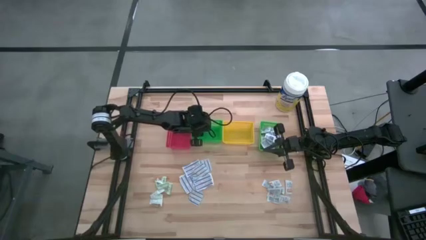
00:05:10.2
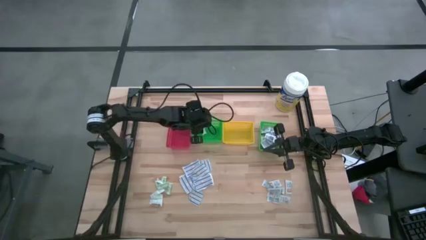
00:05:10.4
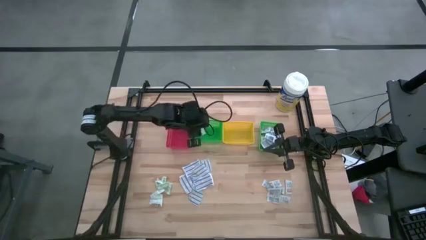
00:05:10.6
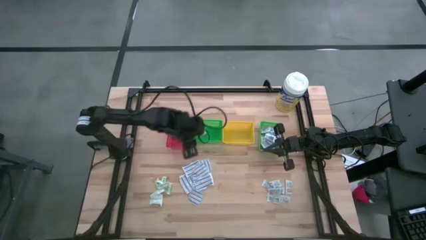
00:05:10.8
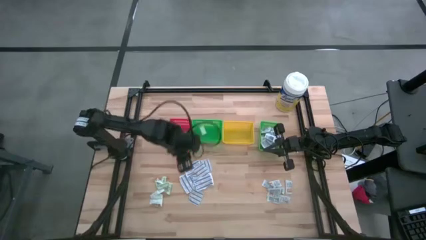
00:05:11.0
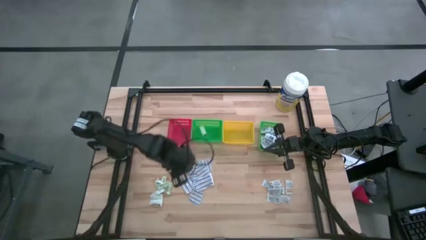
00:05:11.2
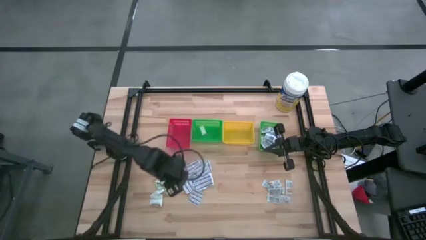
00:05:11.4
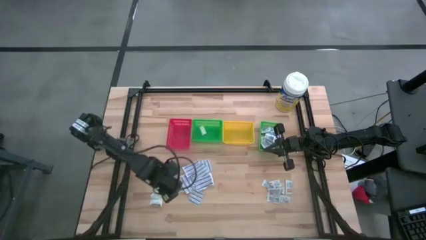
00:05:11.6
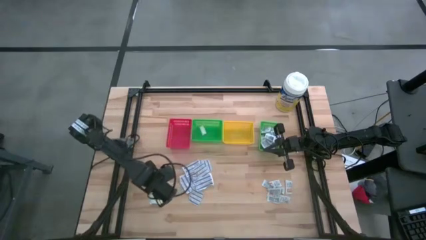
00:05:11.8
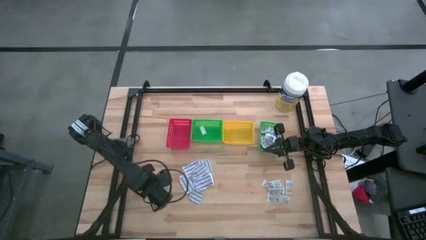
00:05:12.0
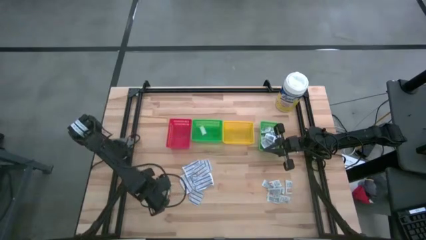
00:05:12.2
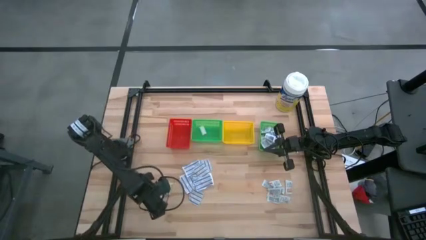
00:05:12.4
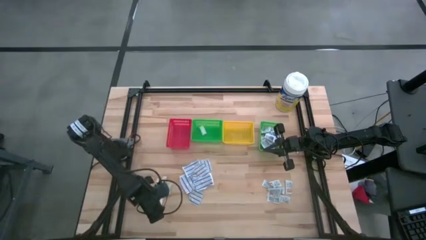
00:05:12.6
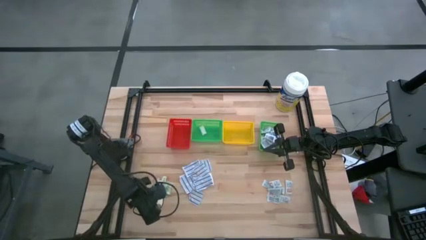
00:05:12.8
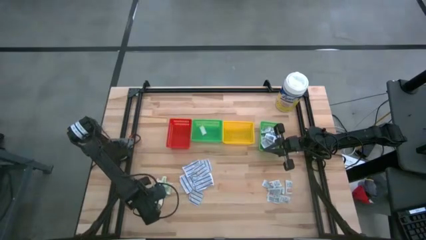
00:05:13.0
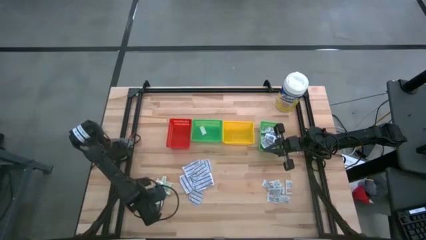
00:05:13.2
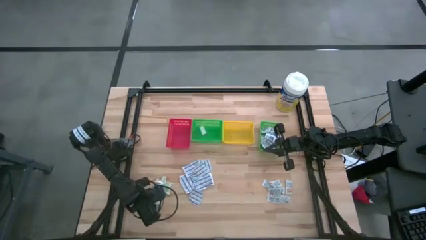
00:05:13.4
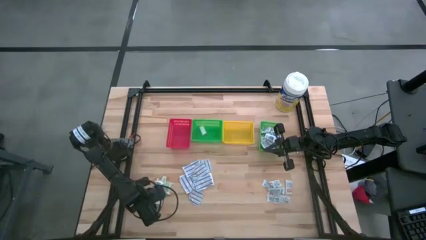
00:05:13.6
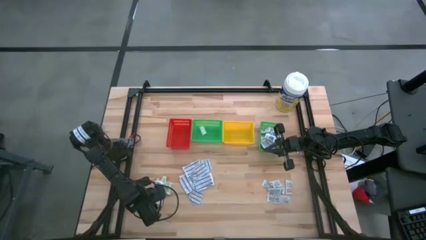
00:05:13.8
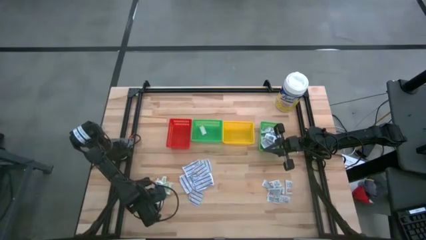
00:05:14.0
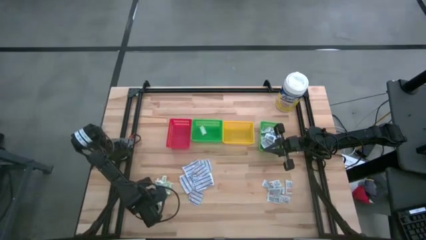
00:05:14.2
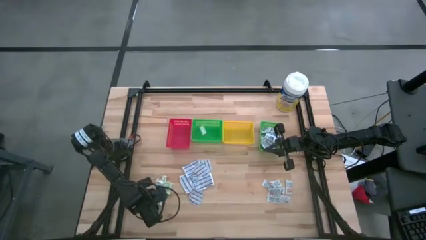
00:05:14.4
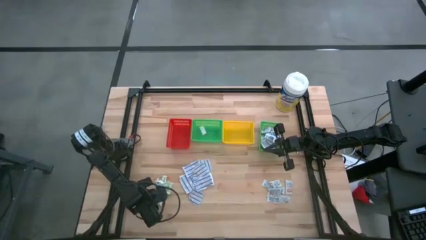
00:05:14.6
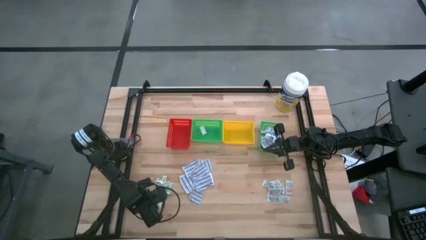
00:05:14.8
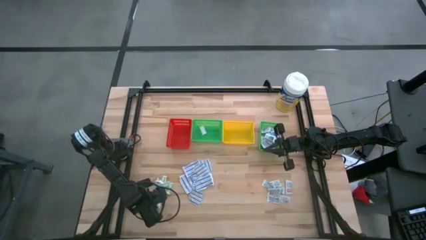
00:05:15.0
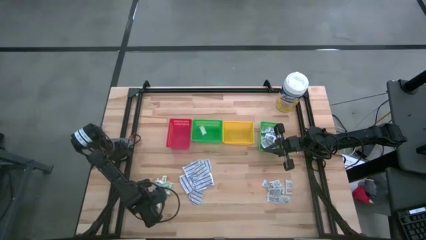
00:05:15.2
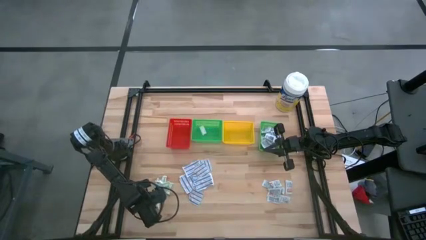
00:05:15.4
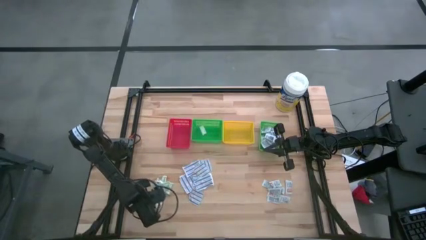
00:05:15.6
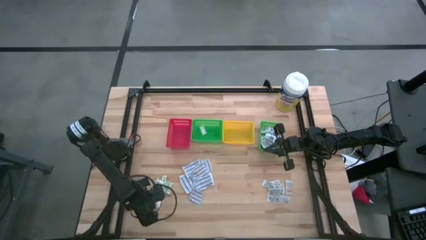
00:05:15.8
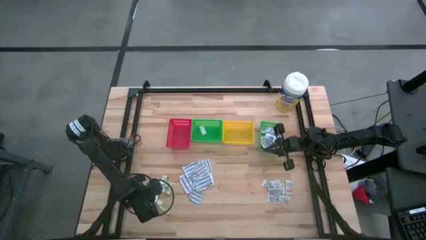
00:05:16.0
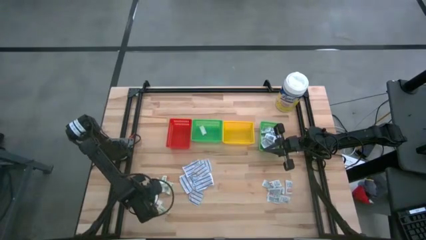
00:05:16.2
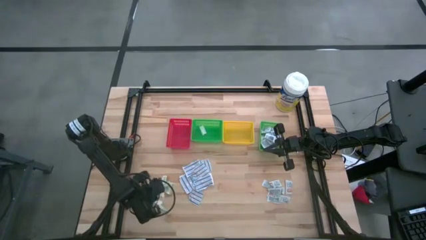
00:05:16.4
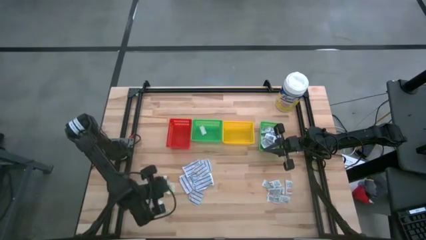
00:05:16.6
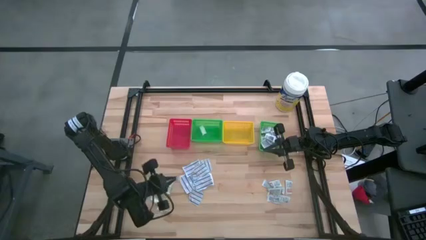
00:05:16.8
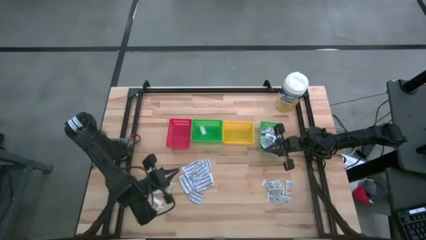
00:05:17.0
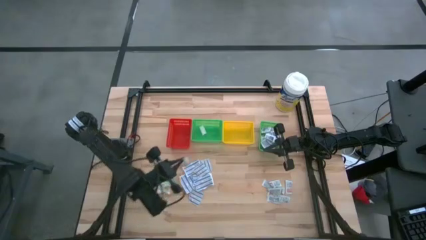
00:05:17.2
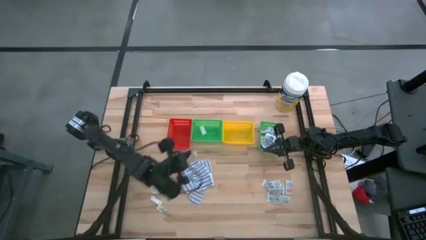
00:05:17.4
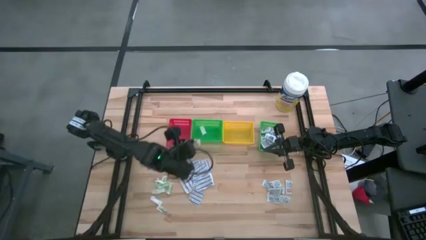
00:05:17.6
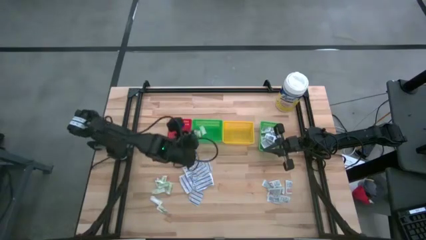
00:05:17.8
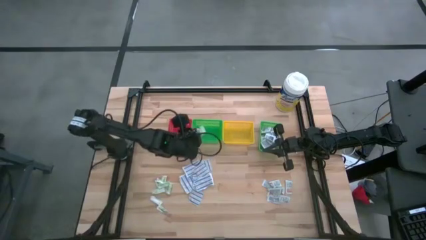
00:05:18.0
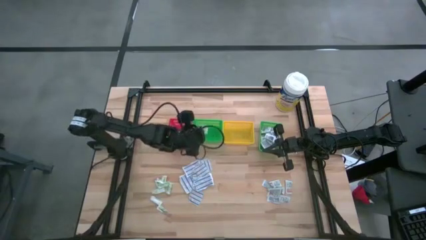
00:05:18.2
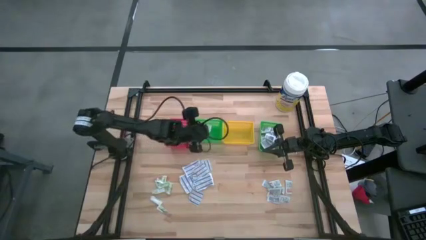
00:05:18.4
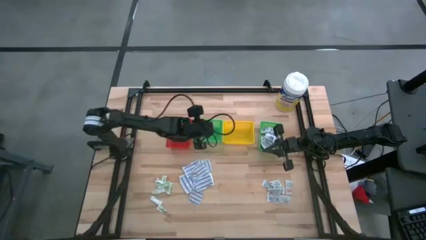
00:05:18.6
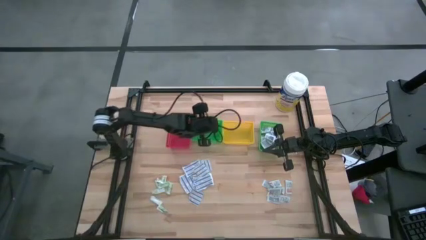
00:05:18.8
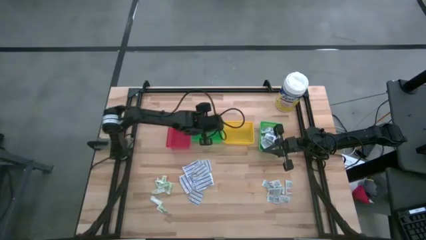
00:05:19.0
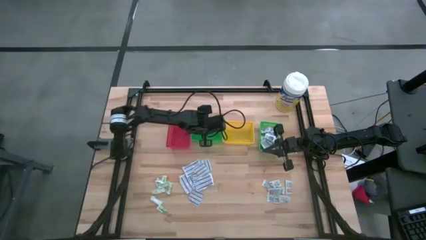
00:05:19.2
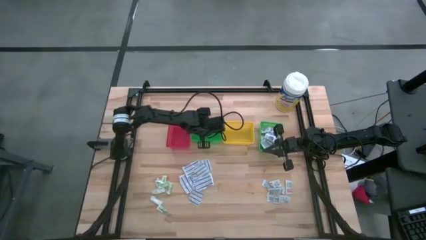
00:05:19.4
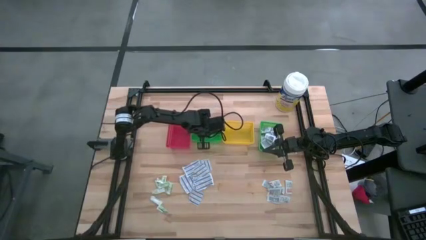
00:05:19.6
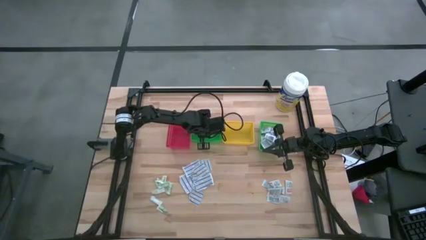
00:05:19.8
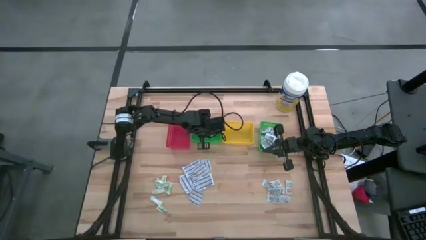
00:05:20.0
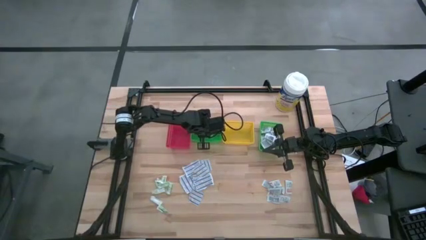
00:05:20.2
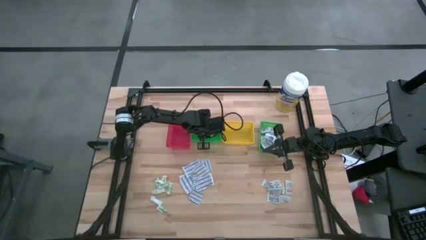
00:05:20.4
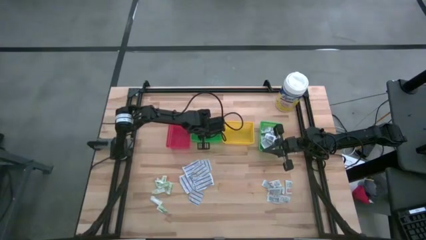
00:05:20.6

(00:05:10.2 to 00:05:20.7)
Task: Pick & Place First Aid Supplies
Put the green bandage into the left green bin

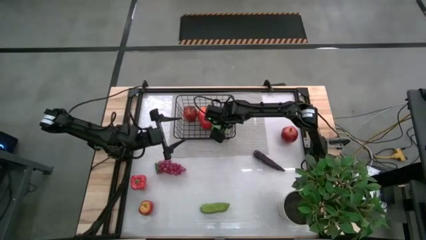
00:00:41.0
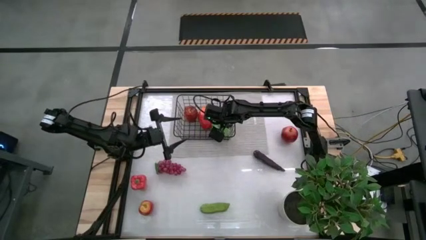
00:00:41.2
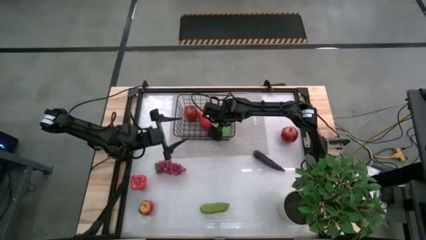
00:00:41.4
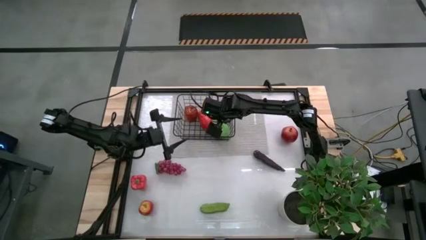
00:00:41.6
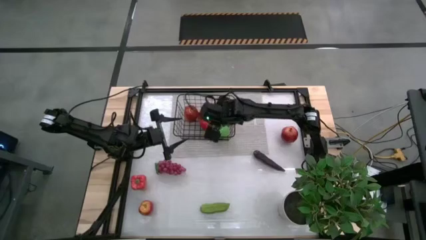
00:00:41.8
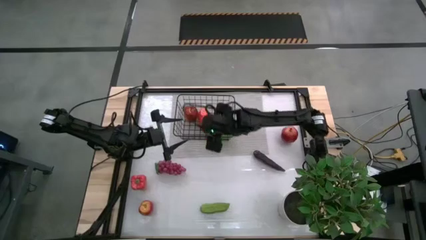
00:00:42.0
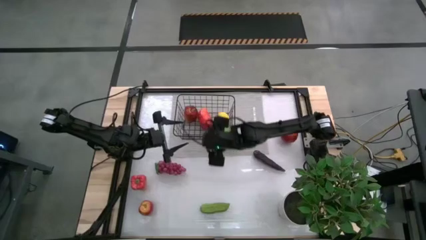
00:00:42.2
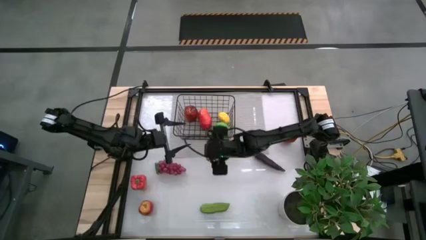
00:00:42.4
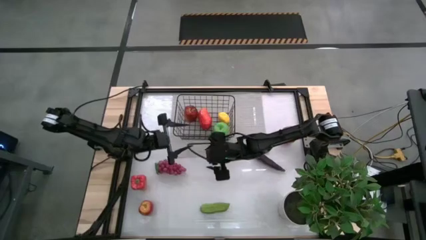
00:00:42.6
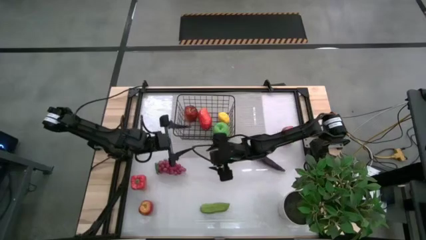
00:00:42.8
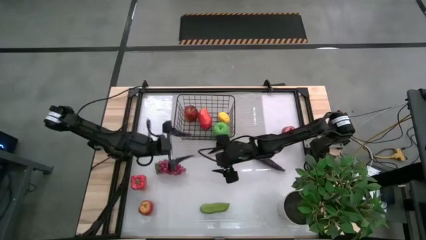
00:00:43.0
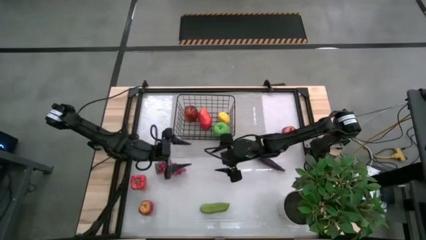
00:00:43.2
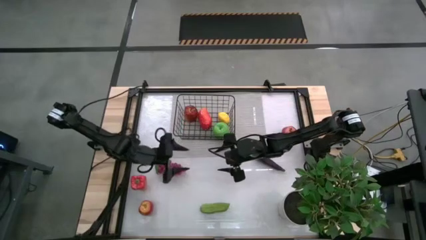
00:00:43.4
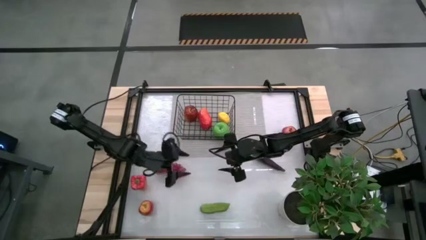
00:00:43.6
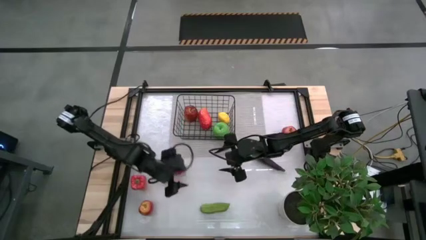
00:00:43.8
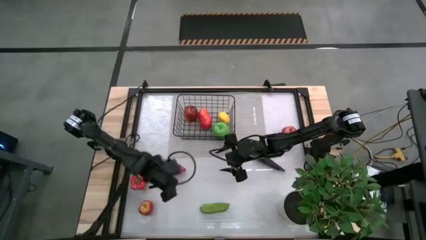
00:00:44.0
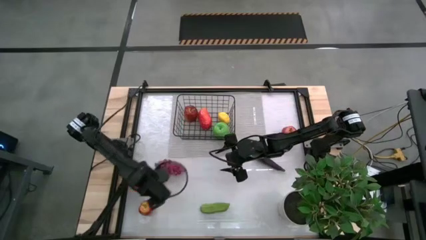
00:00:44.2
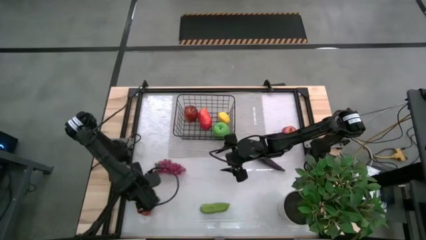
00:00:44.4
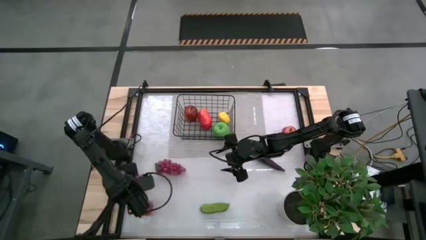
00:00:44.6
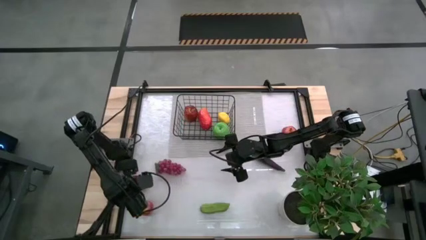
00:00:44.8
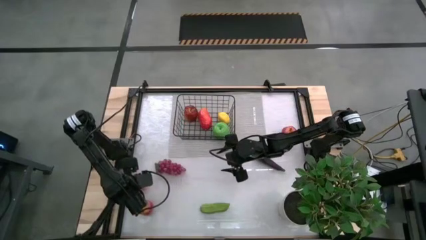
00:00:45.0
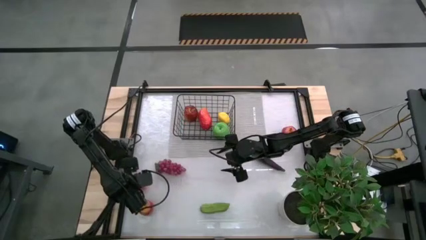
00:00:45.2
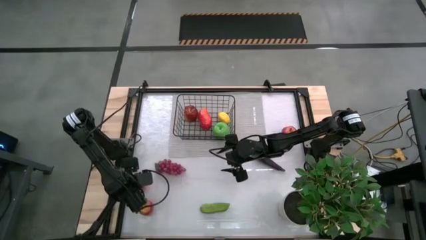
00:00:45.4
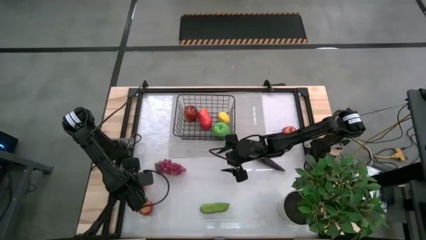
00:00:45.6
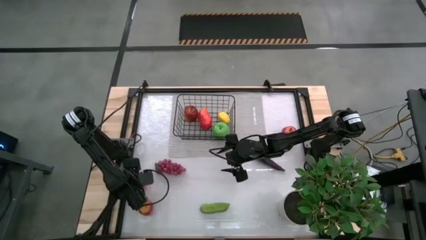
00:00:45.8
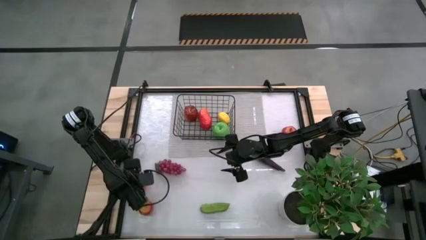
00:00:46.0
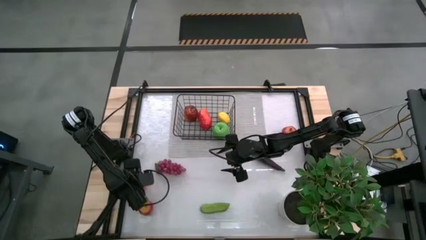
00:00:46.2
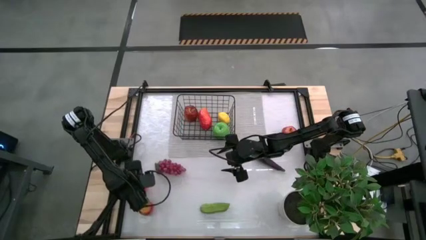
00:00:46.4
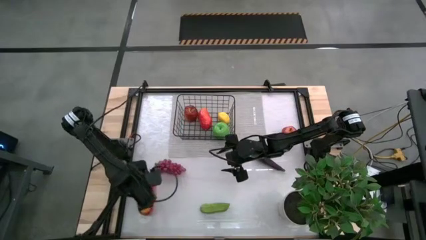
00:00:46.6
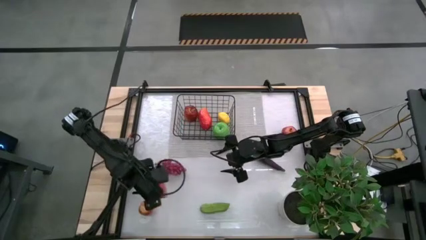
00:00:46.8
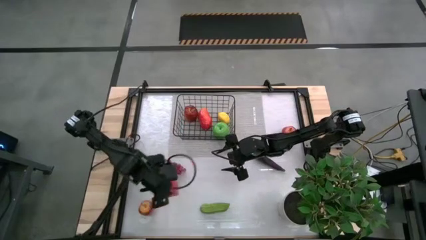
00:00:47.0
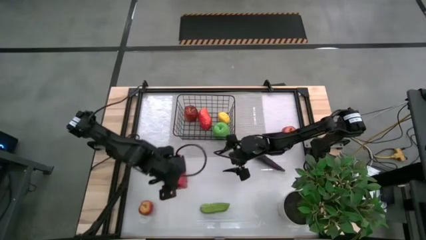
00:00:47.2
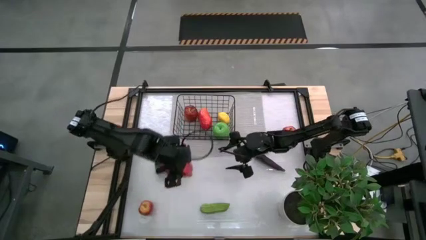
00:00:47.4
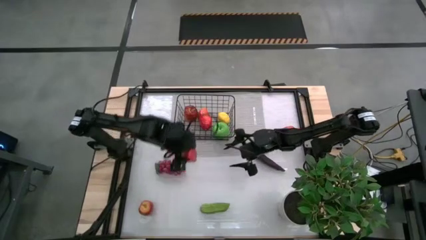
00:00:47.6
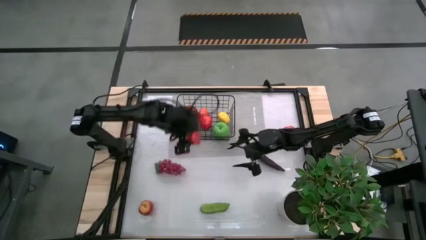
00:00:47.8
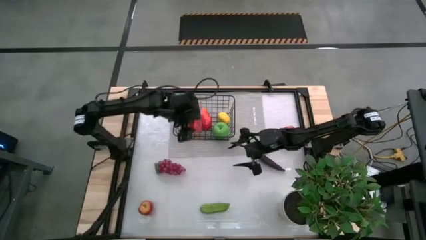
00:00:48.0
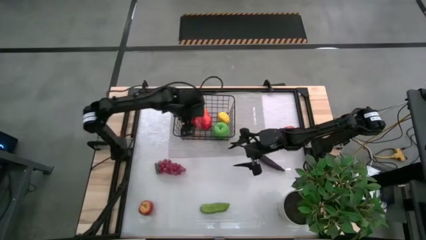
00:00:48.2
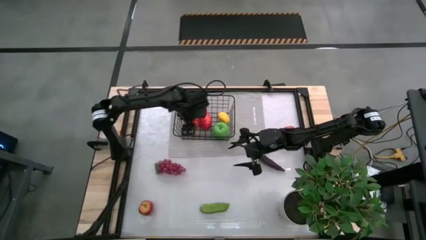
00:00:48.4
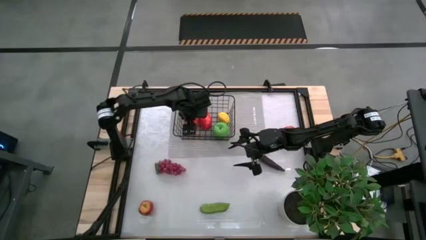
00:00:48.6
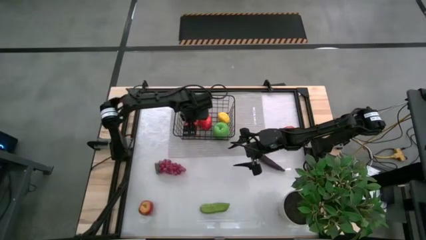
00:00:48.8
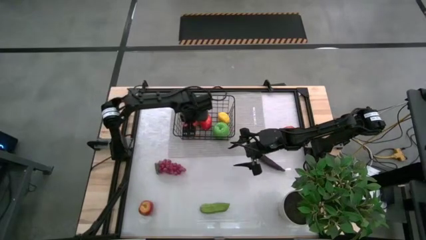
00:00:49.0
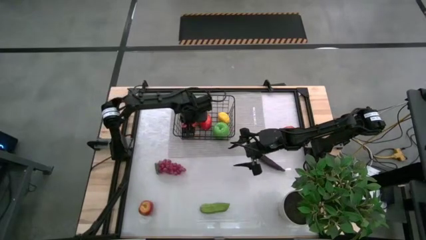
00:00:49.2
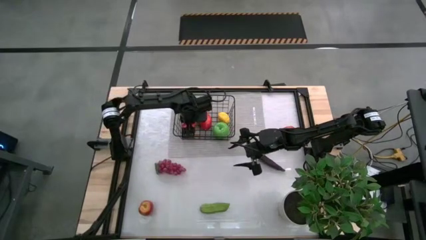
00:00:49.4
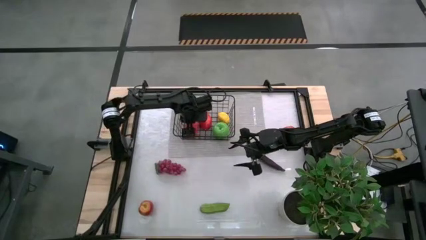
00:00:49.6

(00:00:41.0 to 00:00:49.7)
Task: Build produce basket
Put the red bell pepper into the wire basket
